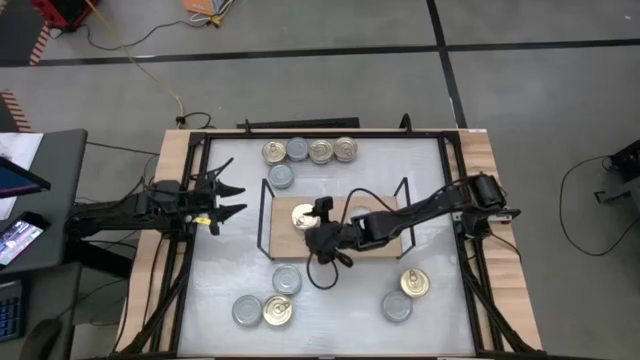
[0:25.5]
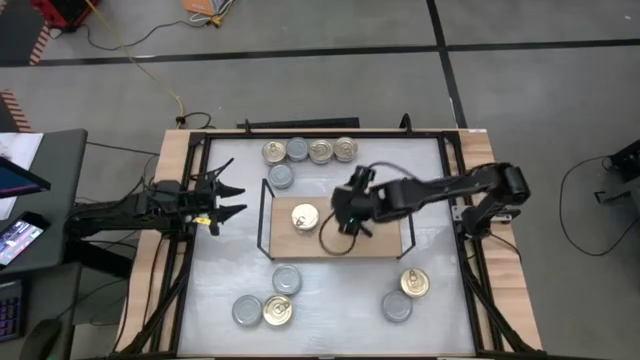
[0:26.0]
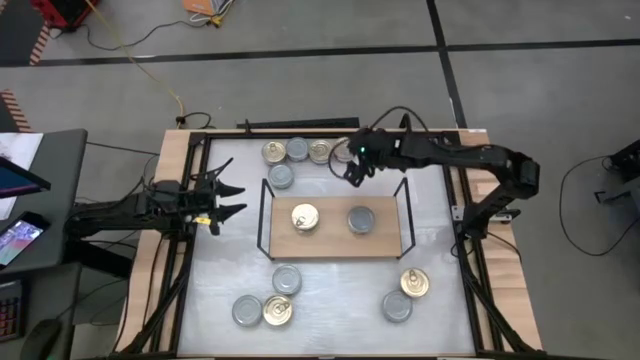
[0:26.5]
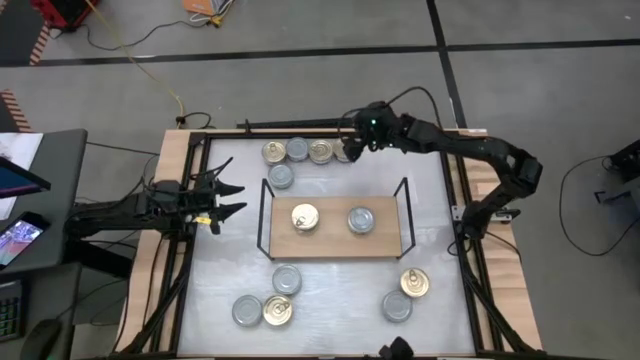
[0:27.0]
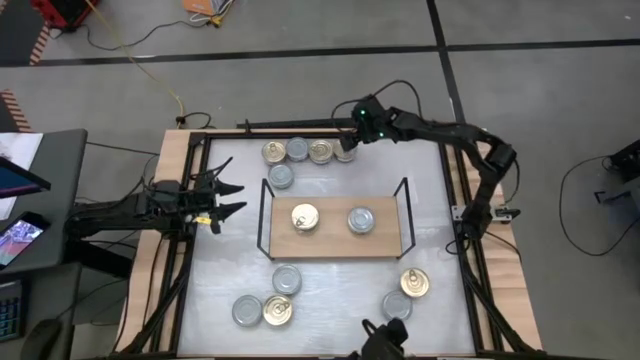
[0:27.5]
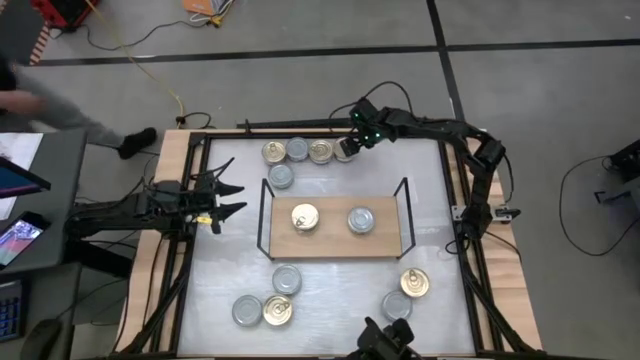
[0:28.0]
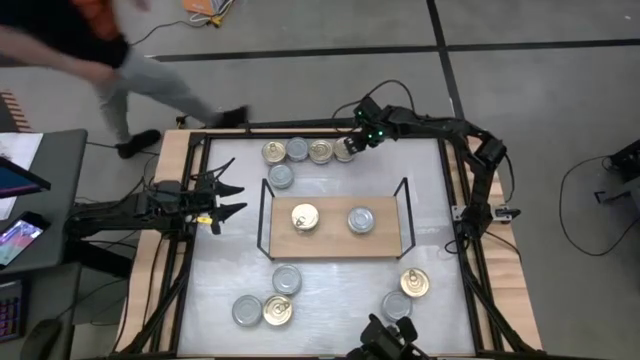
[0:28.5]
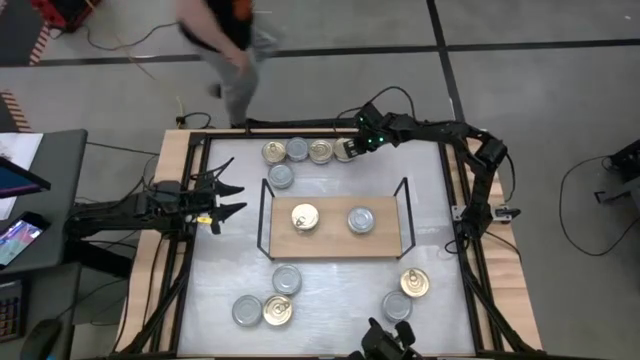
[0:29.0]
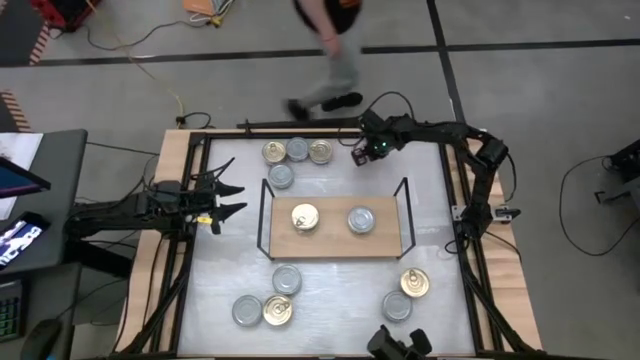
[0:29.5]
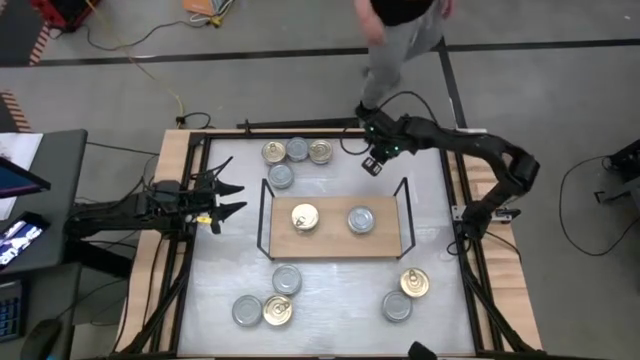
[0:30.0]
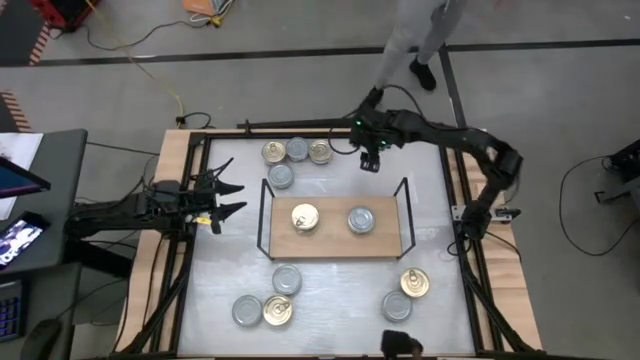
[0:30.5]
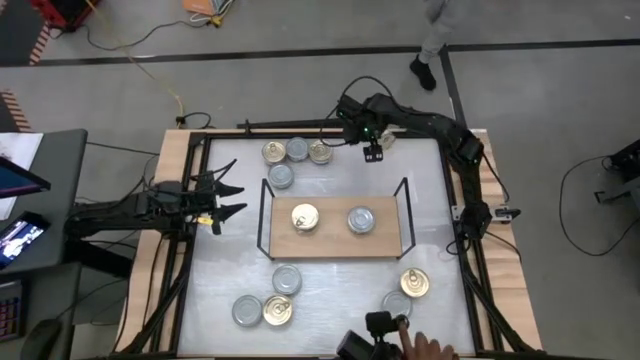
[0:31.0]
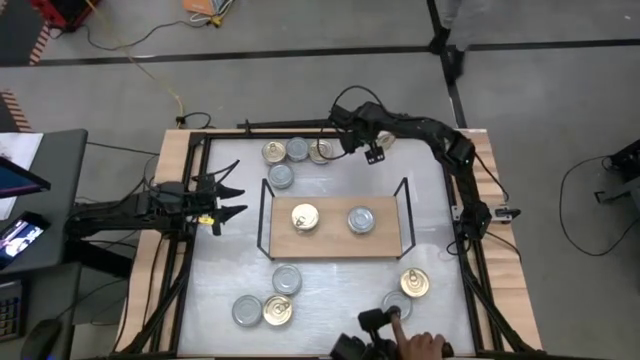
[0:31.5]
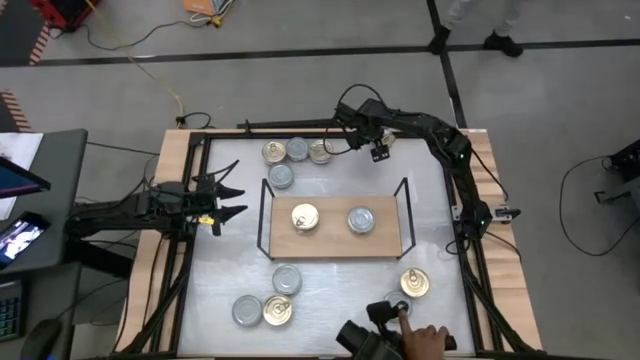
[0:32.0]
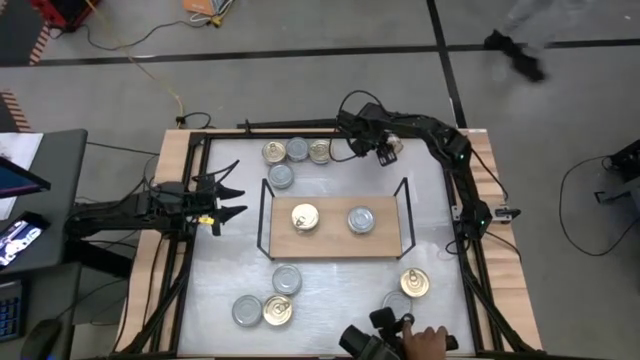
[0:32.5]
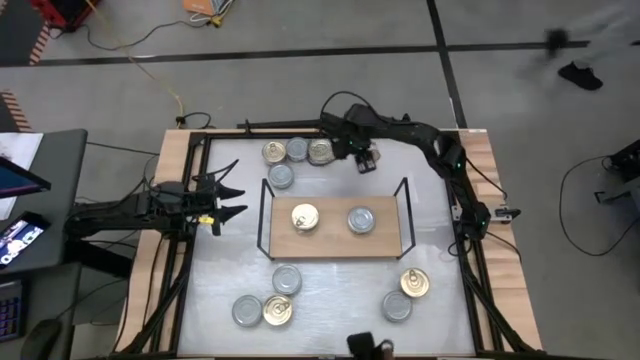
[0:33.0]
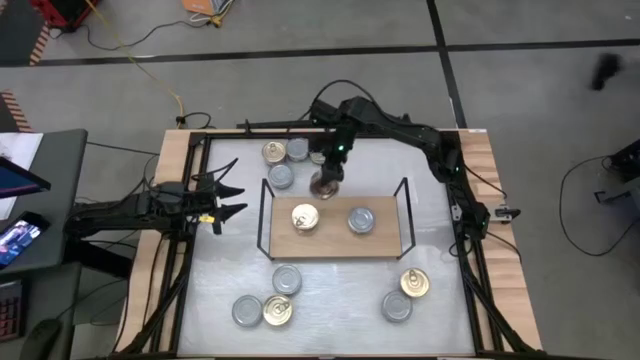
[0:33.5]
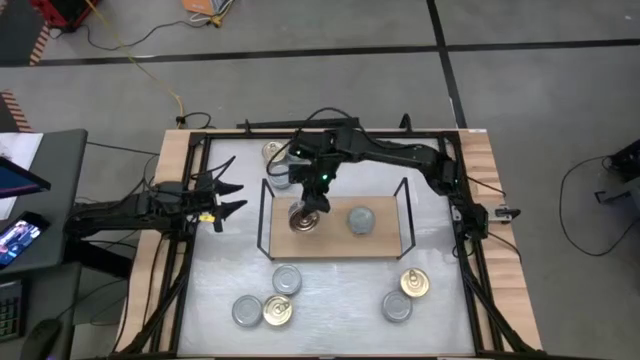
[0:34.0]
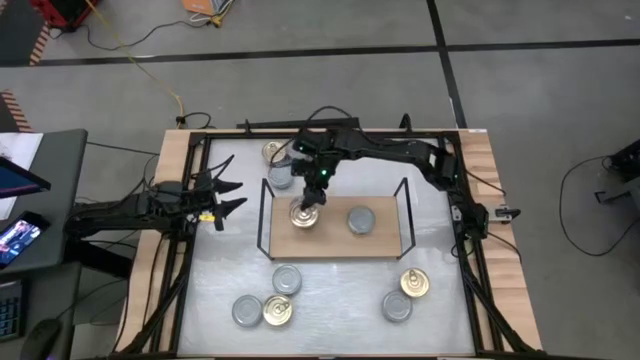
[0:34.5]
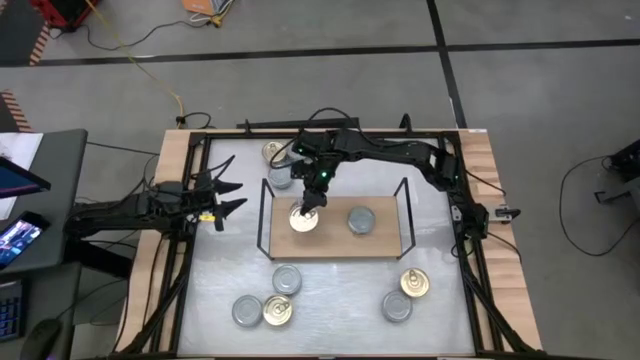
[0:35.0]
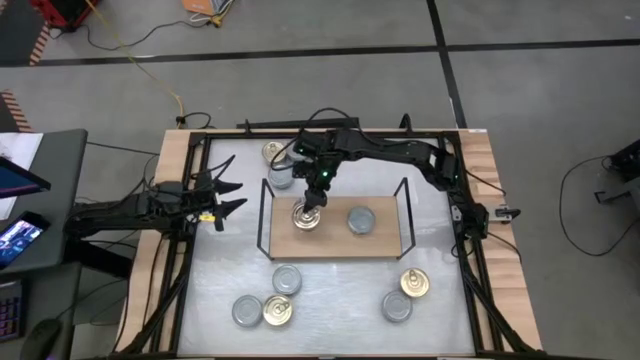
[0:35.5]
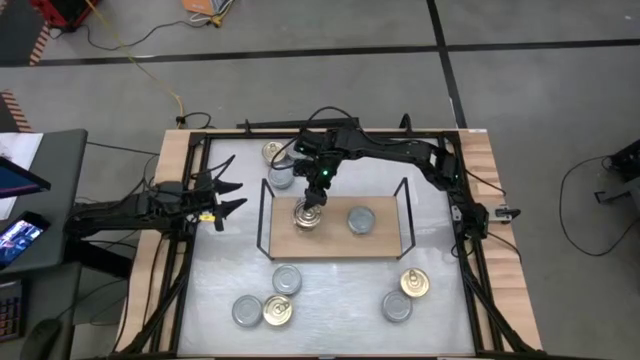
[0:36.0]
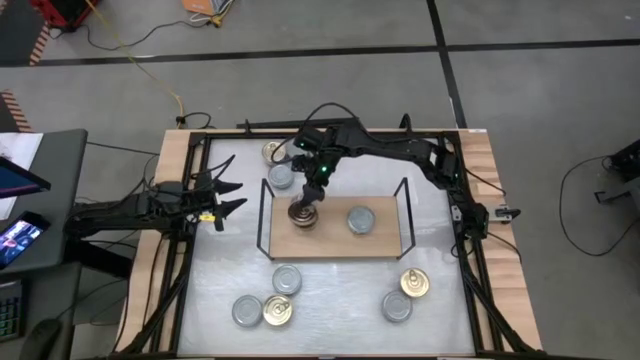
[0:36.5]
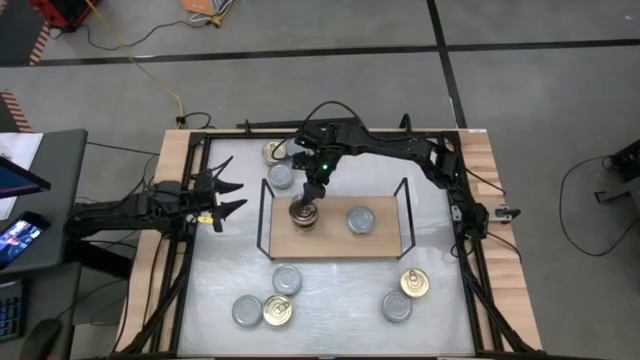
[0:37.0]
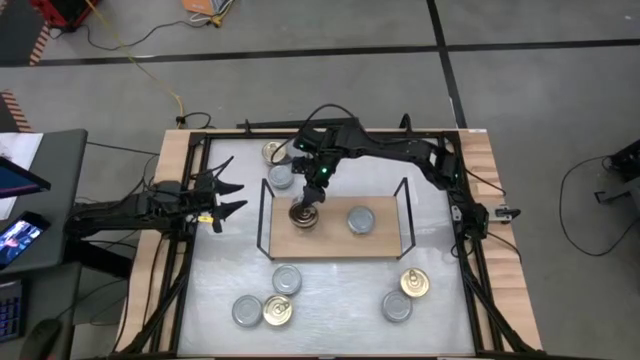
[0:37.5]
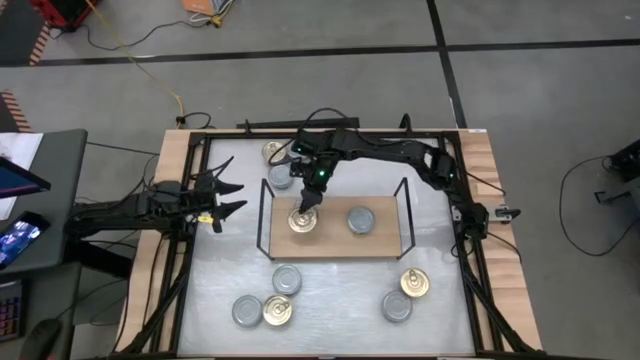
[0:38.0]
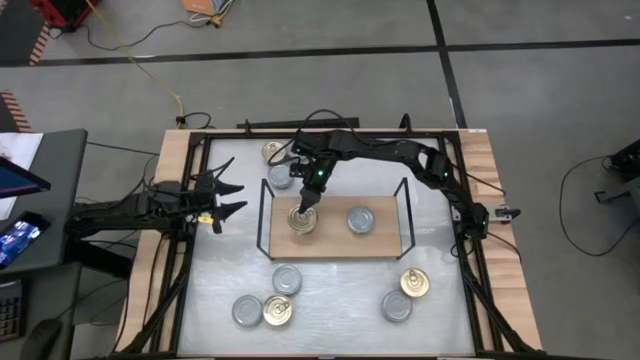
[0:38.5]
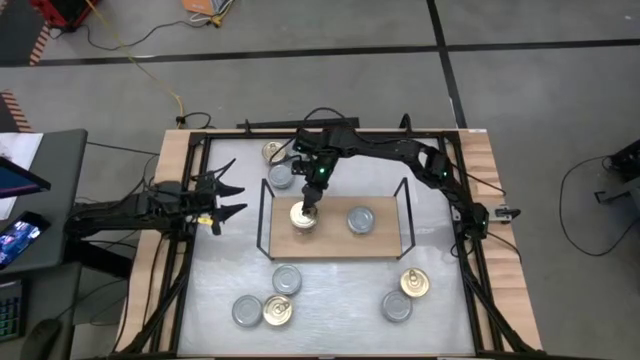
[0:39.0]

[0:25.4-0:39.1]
Task: Stack canned seafood by type on shelf
Stack the blue tuna can on top of the blue tuna can on the shelf

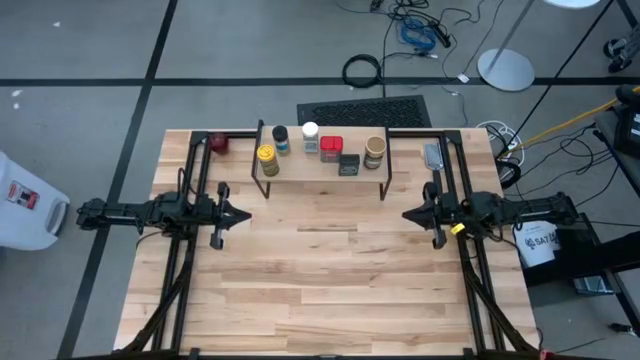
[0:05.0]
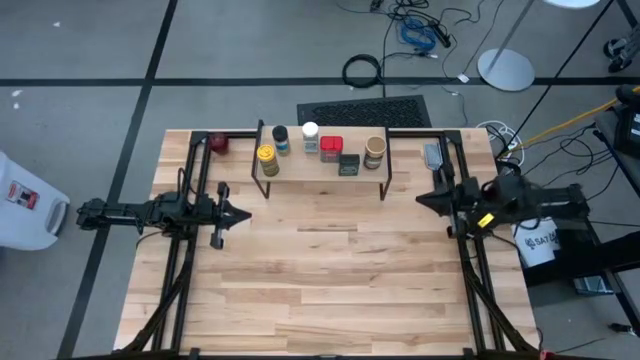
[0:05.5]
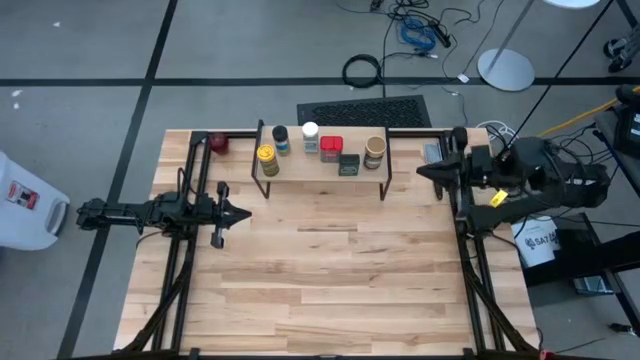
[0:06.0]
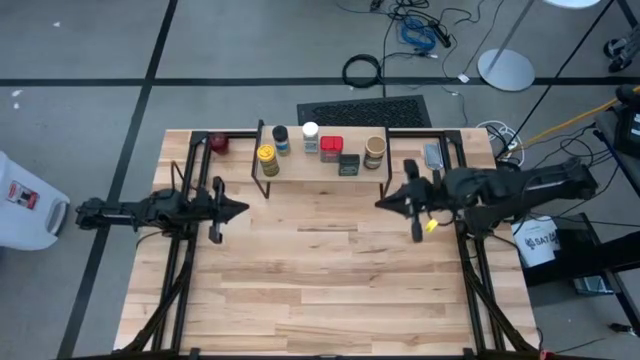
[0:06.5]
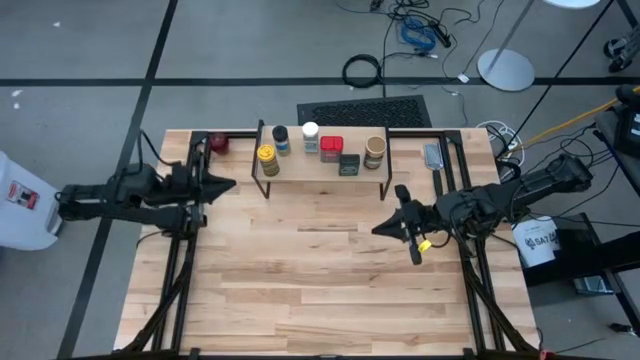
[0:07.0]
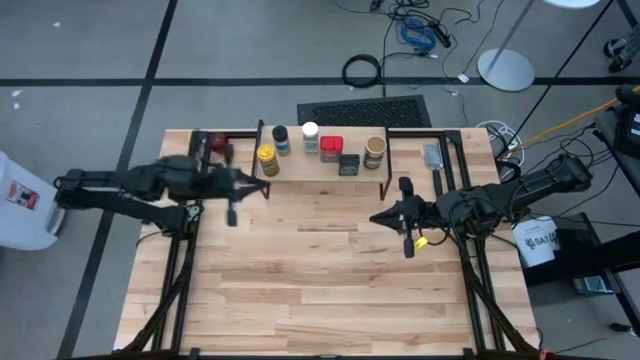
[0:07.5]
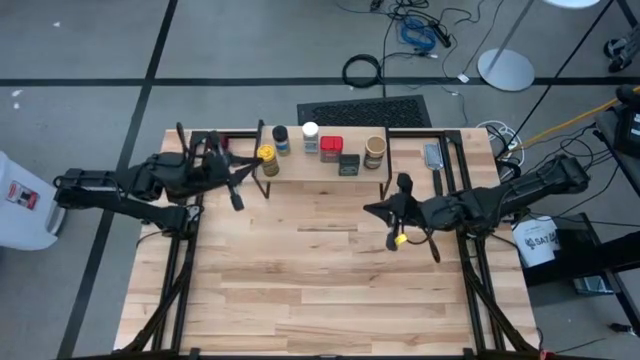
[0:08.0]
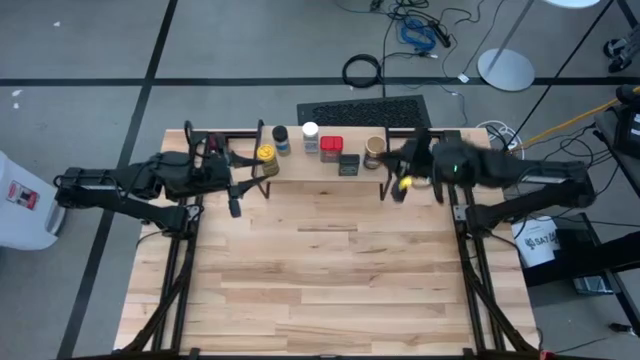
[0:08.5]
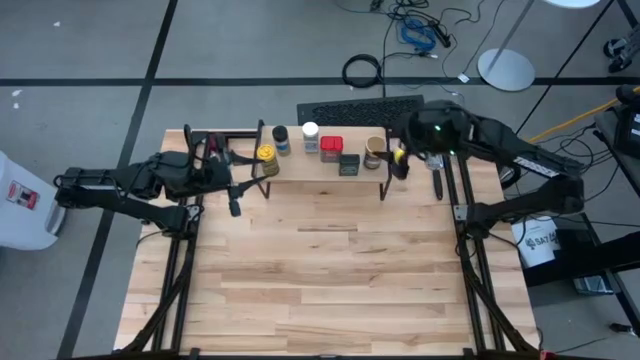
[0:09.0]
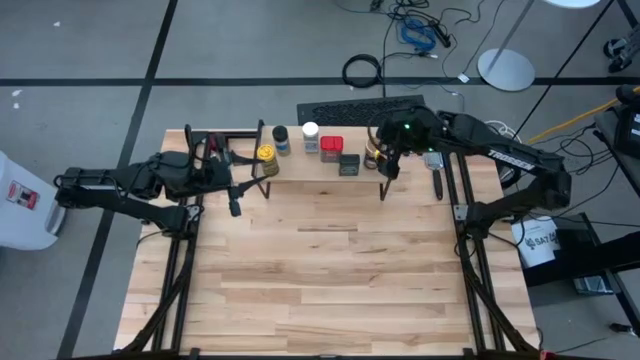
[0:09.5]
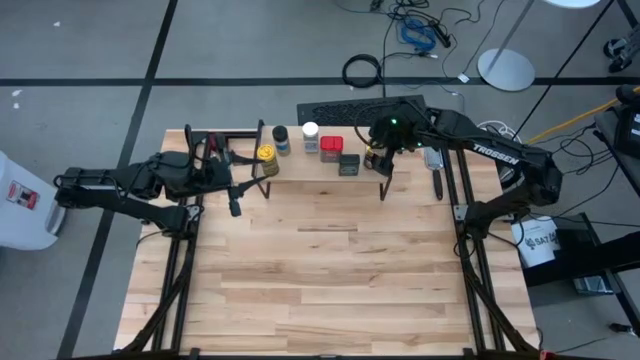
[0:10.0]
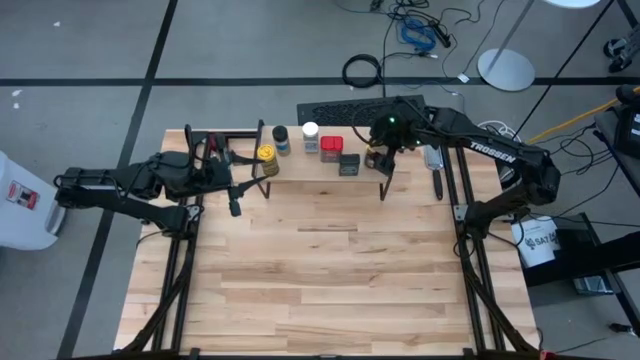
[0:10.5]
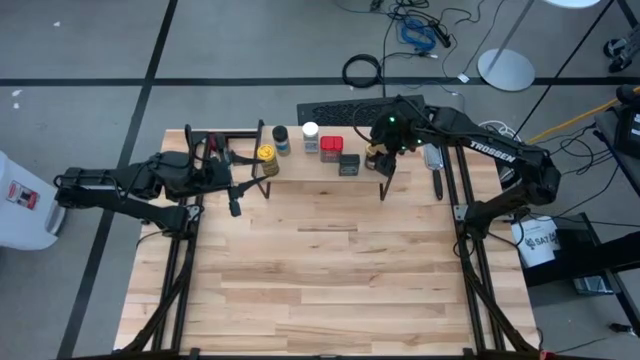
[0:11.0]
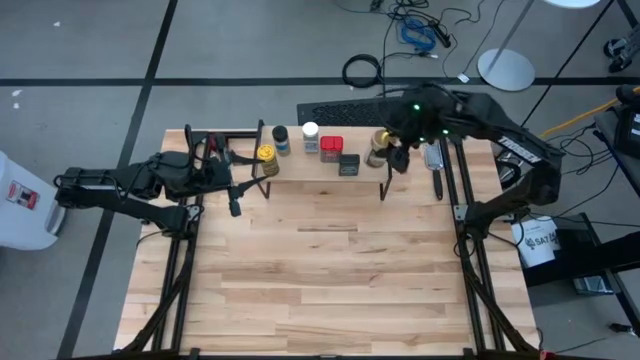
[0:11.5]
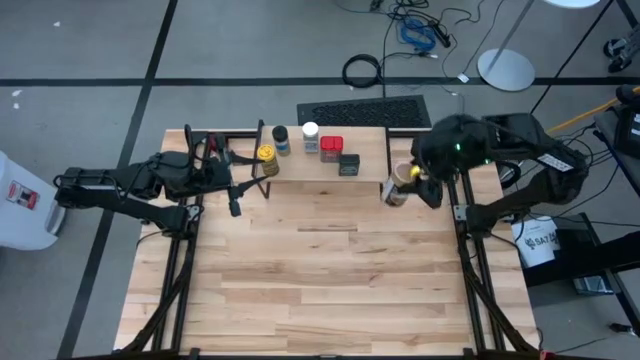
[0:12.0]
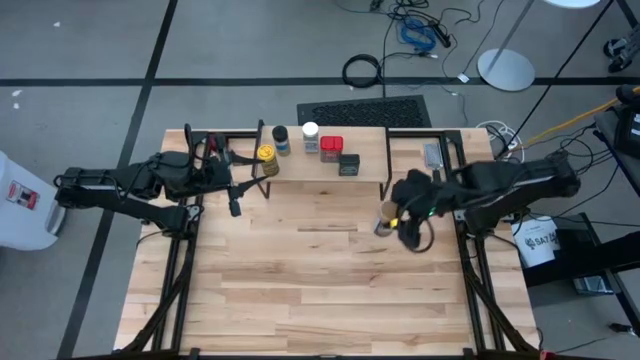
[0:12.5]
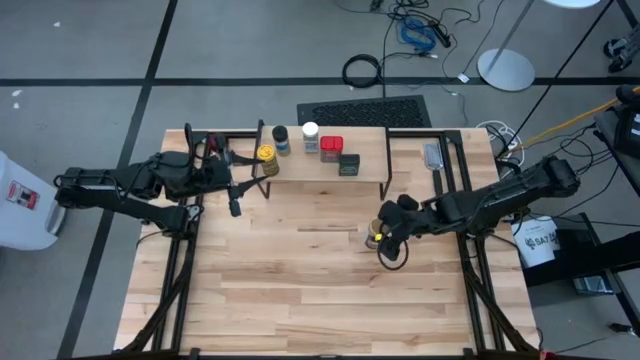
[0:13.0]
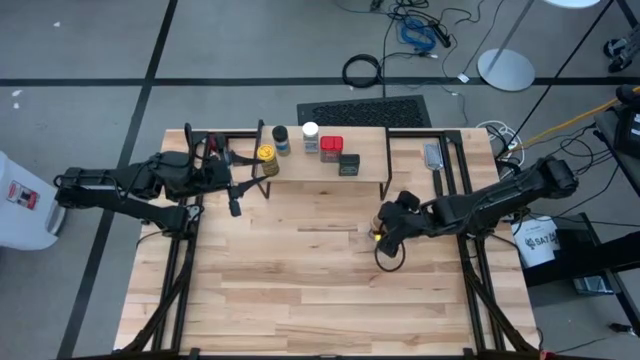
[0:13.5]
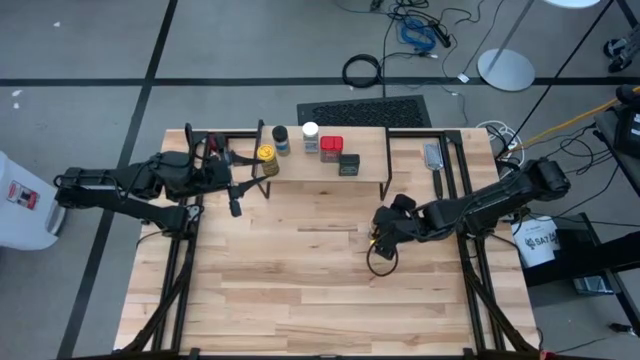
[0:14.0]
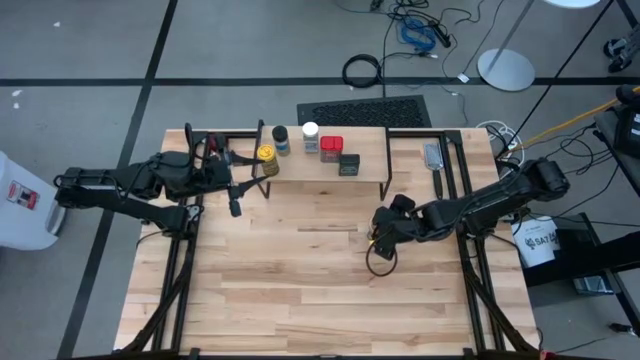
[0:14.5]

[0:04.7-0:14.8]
Task: Shelf spices
Remove the brown seasoning bottle from the shelf
